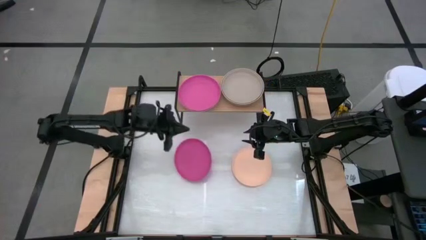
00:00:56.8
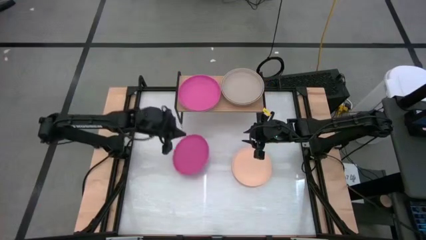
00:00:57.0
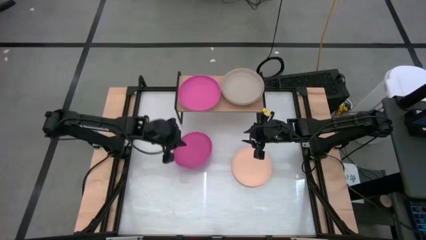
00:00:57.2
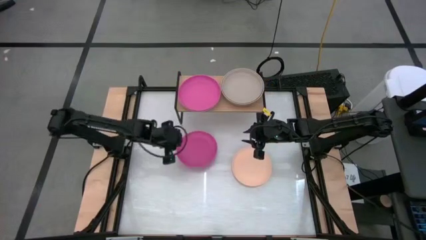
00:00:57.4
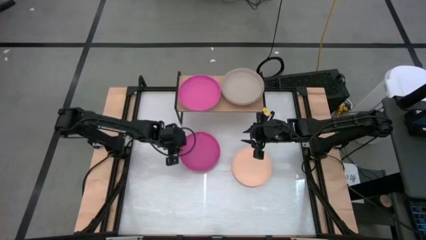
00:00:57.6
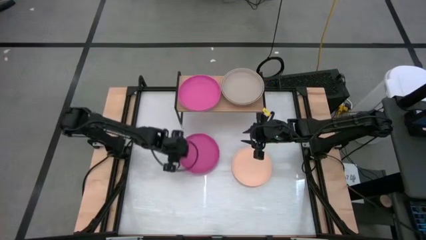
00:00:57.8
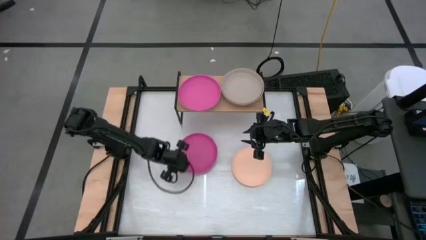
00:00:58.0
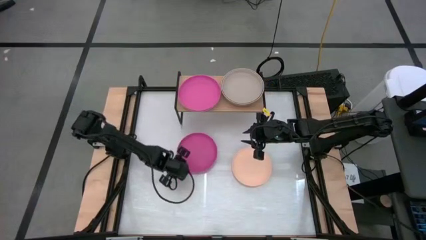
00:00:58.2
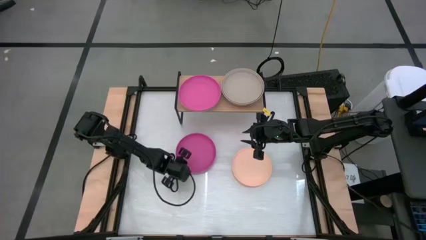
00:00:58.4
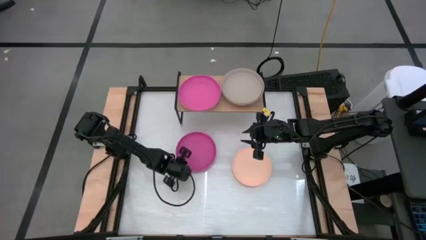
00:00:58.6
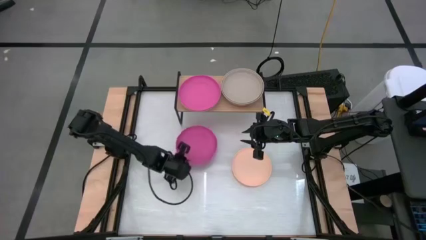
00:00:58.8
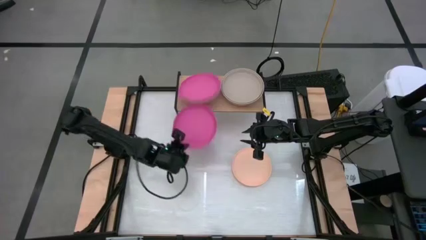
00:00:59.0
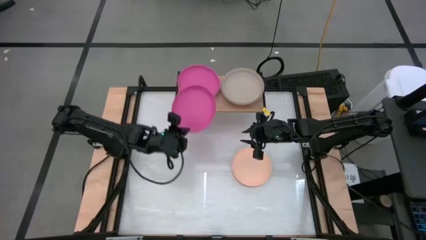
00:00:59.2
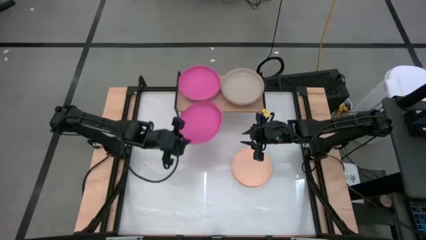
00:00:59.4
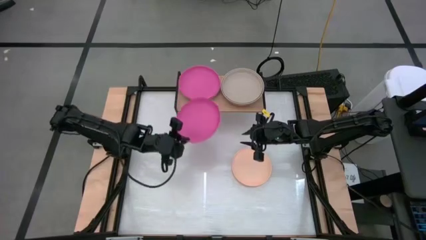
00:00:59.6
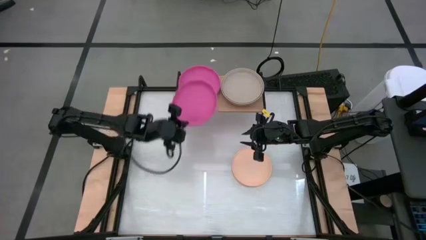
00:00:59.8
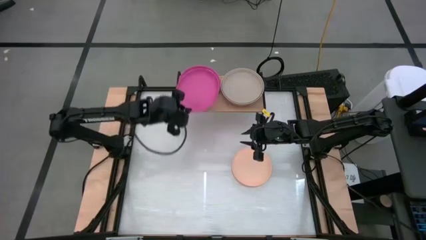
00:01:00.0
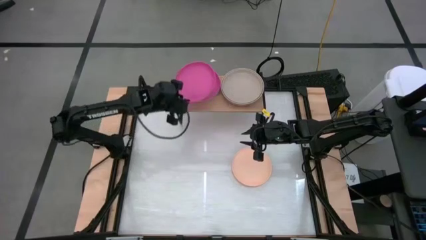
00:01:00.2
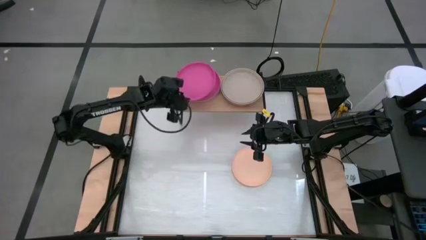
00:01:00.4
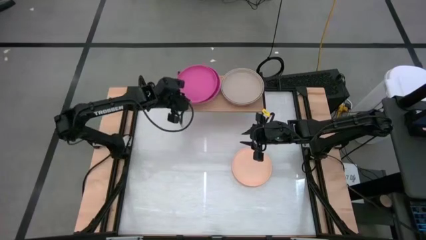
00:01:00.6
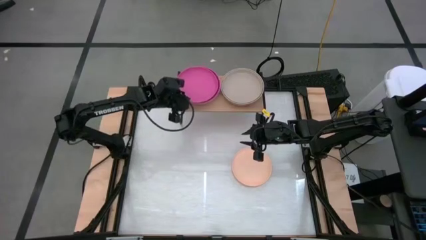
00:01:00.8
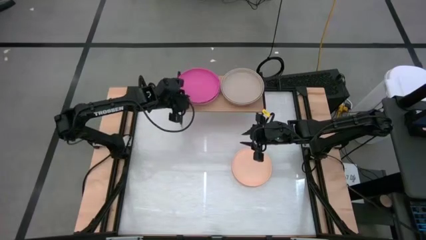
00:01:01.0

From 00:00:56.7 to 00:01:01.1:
Task: Place and stack plates onto a shelf
Stack the pink plate on top of the pink plate on the shelf

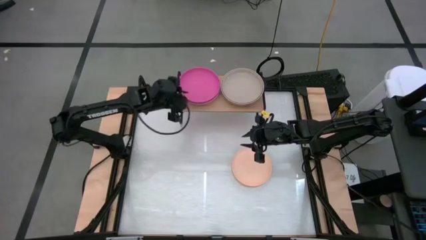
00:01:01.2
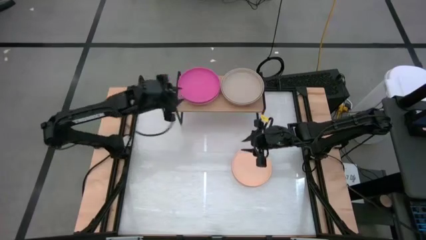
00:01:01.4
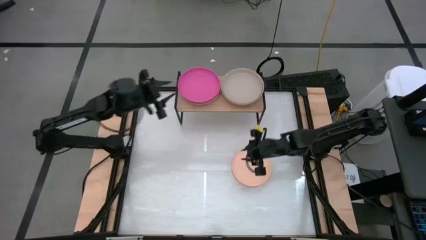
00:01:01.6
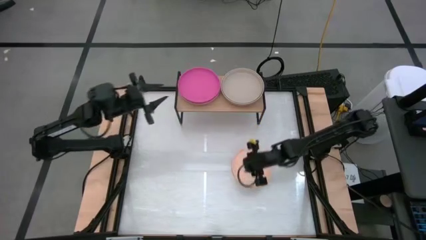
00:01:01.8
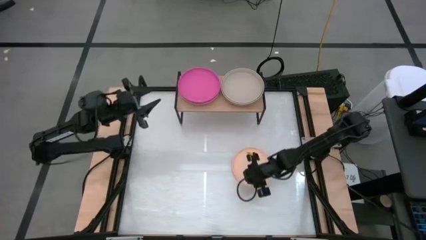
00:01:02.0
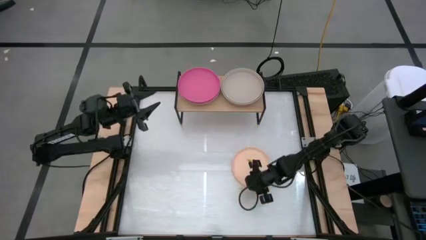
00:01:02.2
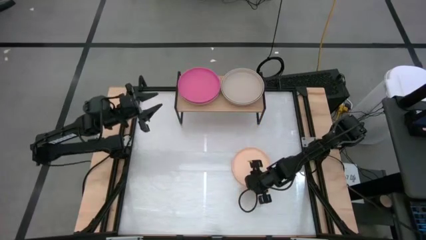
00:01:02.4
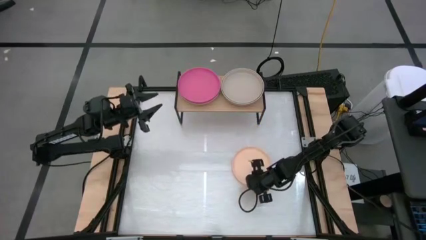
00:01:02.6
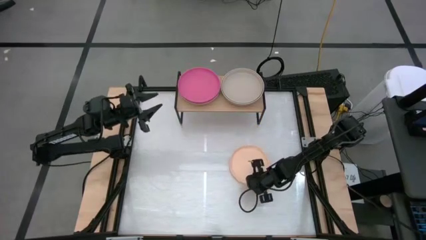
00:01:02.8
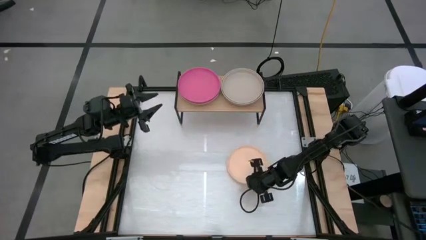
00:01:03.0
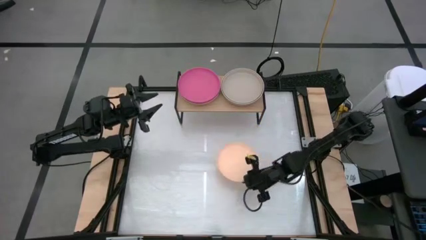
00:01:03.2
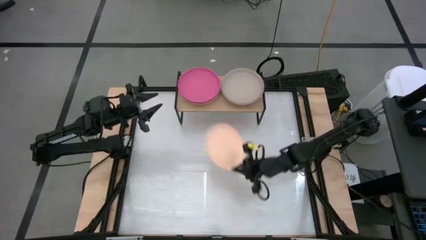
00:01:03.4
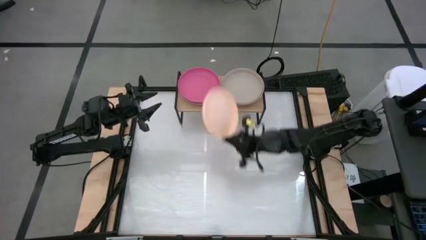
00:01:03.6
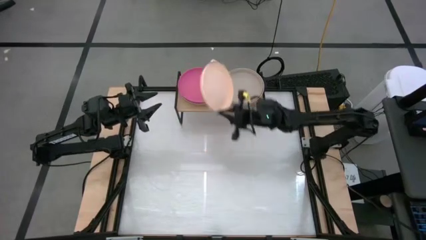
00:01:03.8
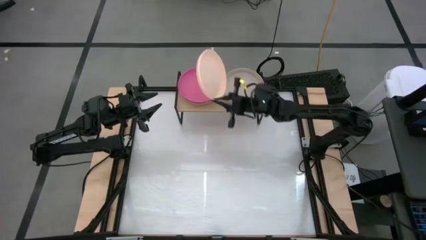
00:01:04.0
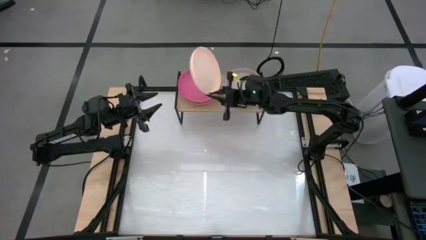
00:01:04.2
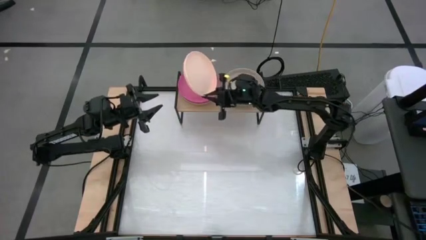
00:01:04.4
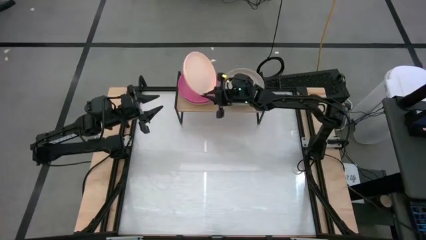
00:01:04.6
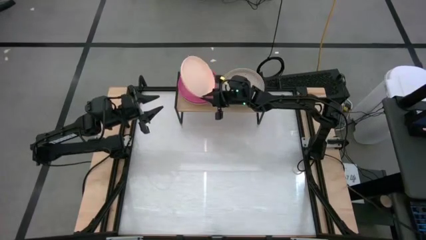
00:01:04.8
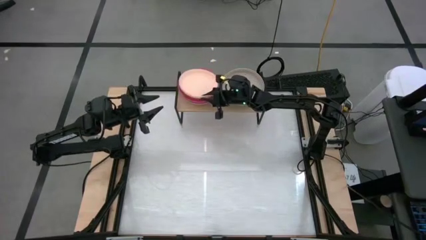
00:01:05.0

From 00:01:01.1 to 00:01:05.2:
Stack the light orange plate on top of the pink plate on the shelf

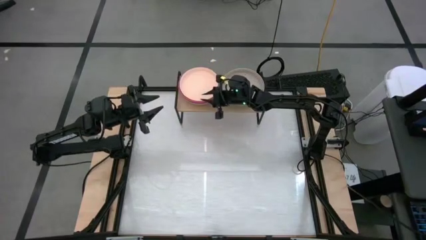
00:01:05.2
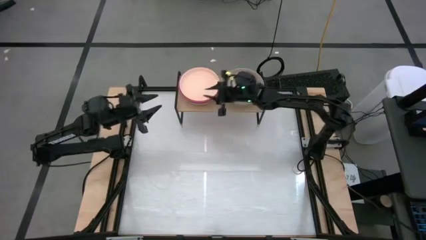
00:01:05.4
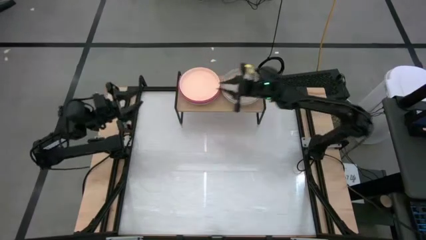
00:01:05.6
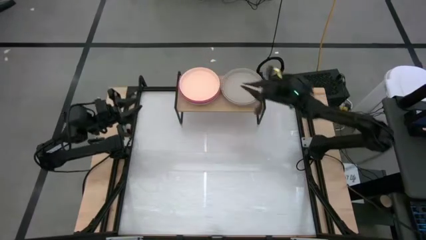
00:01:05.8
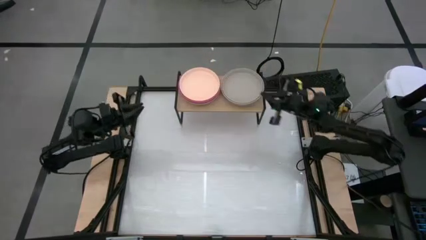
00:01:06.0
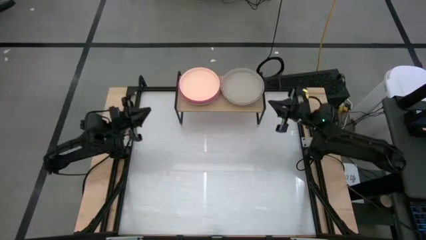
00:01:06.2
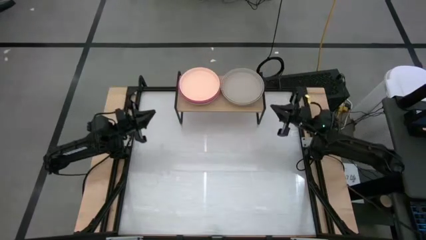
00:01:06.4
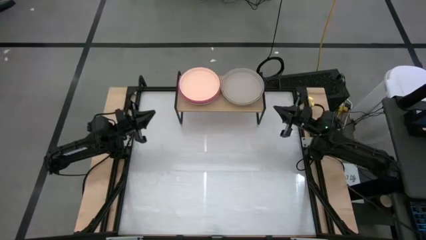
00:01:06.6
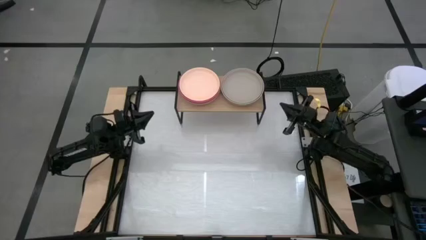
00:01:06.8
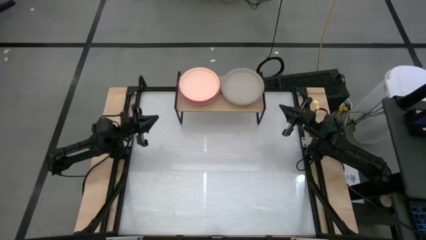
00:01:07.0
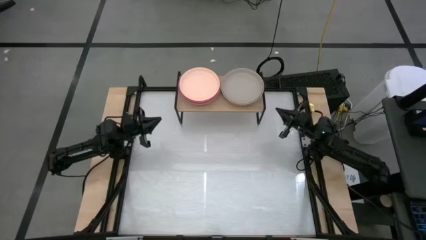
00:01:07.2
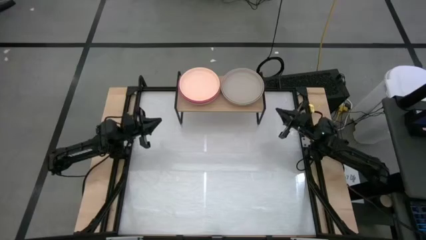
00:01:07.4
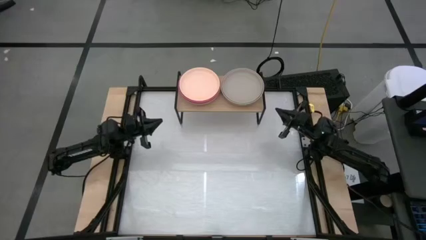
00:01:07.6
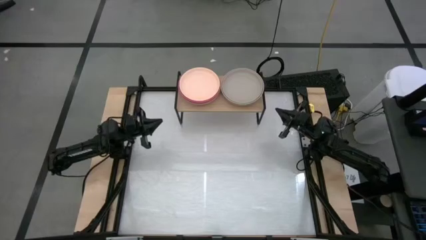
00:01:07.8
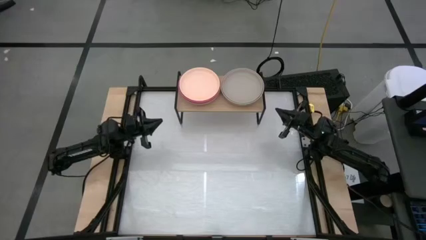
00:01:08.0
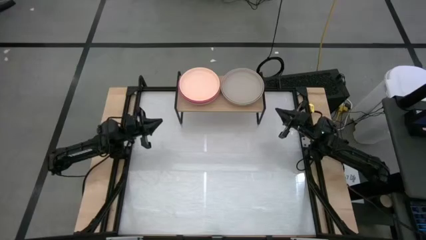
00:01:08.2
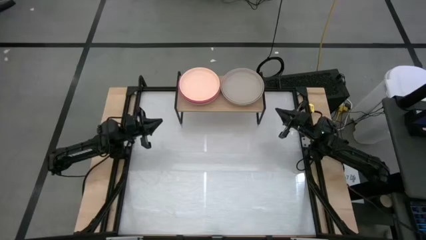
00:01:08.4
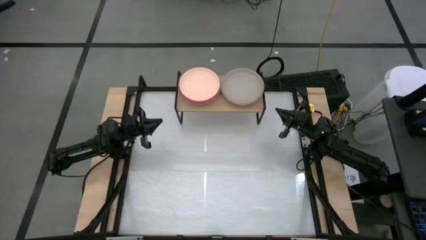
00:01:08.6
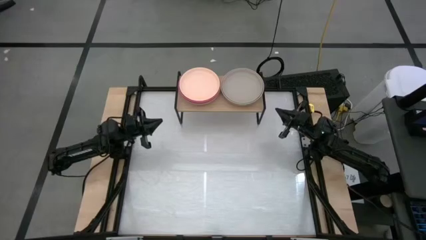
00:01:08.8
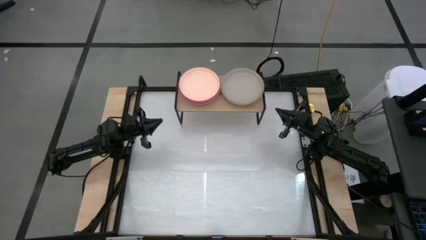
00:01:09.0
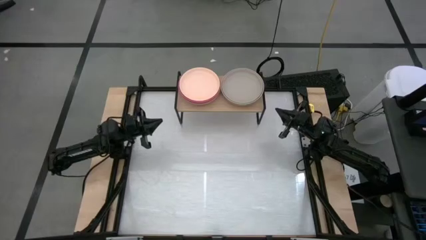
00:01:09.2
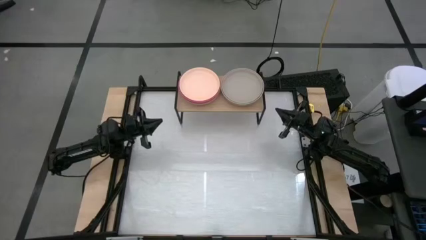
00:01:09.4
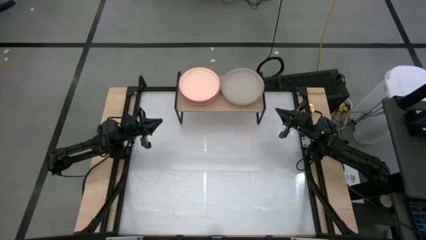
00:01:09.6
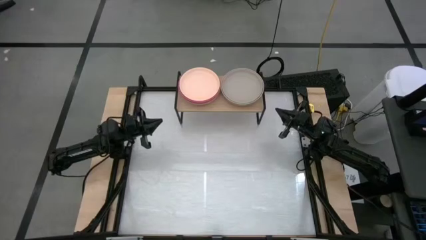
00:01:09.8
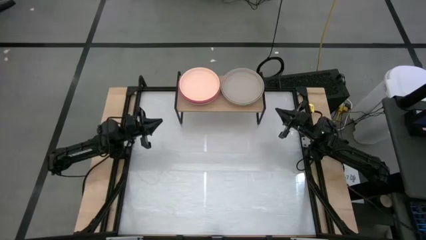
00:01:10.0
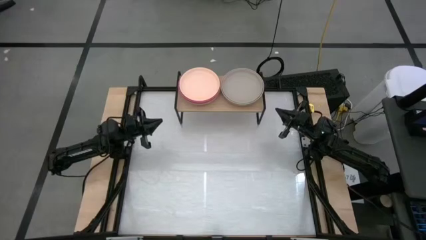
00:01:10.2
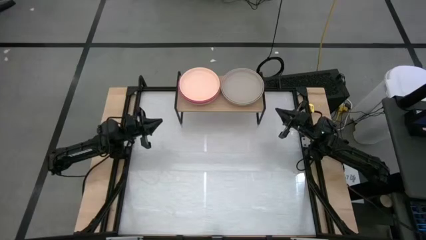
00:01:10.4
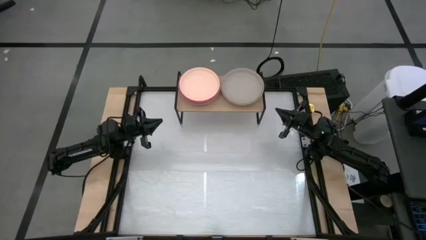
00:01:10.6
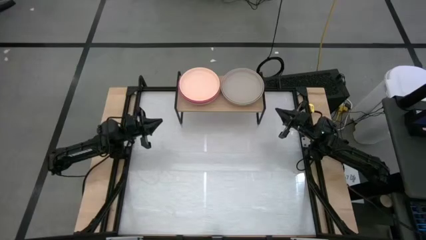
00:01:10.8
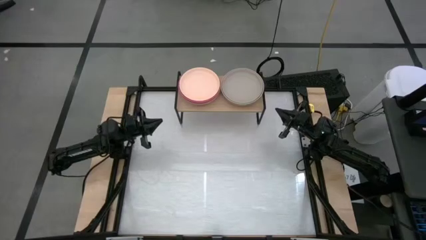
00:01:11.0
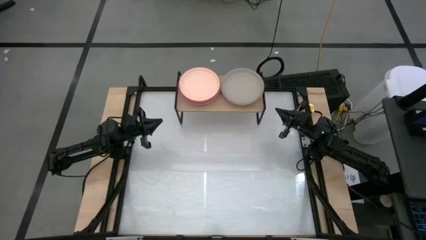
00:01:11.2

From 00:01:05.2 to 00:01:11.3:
Return to Home Position

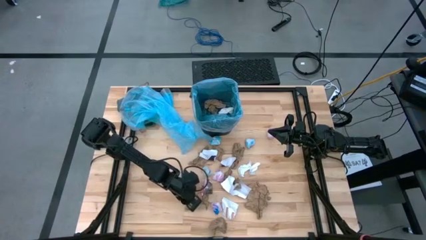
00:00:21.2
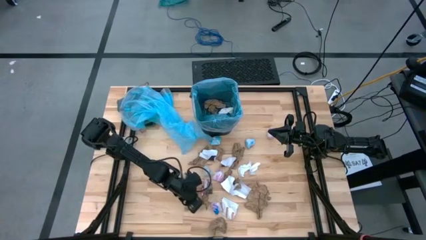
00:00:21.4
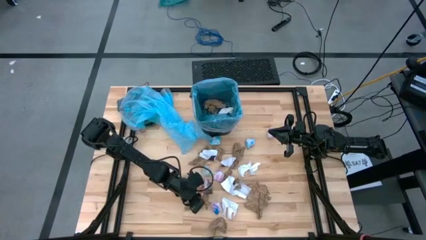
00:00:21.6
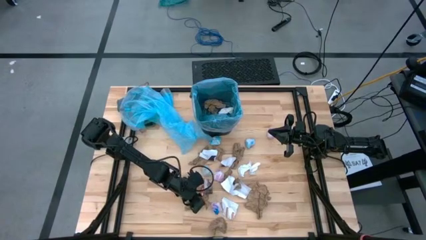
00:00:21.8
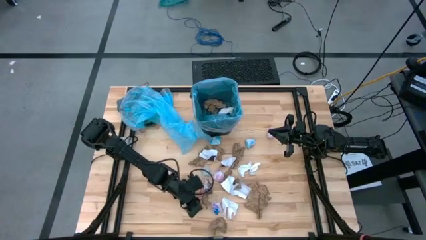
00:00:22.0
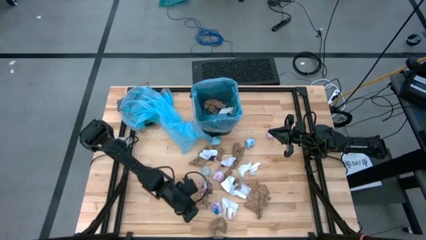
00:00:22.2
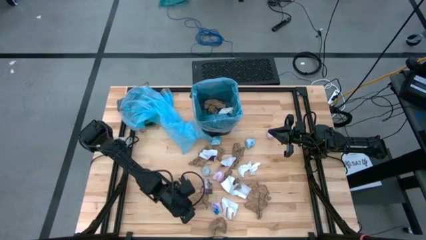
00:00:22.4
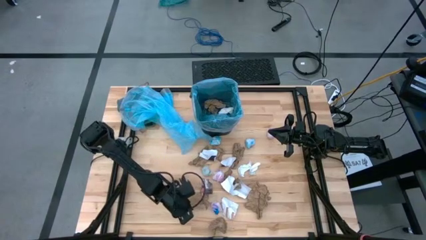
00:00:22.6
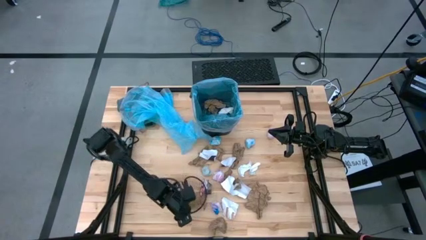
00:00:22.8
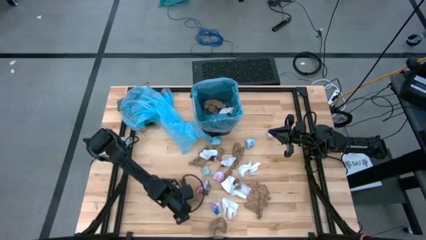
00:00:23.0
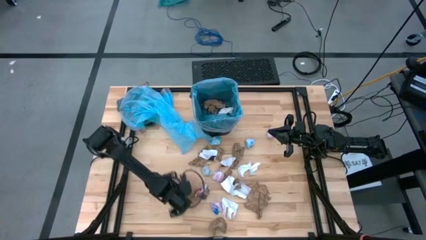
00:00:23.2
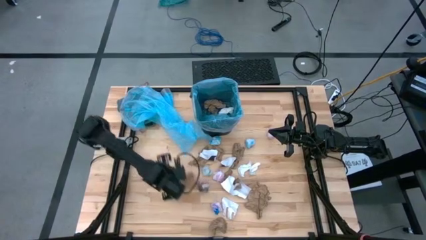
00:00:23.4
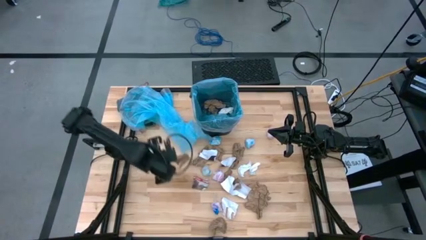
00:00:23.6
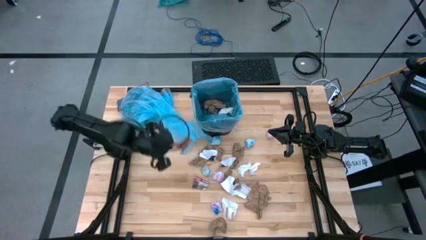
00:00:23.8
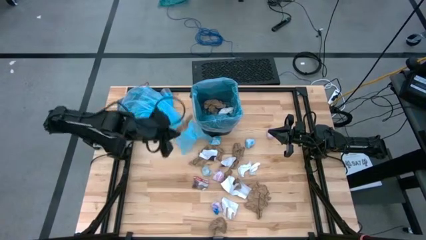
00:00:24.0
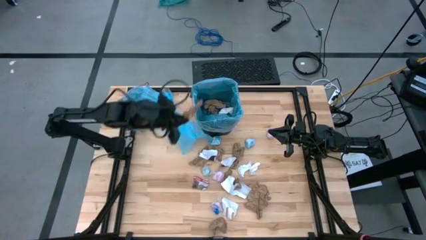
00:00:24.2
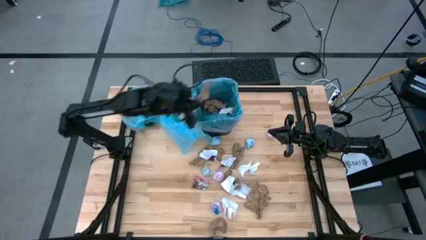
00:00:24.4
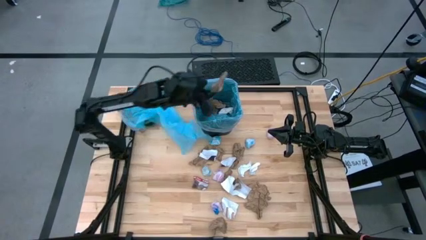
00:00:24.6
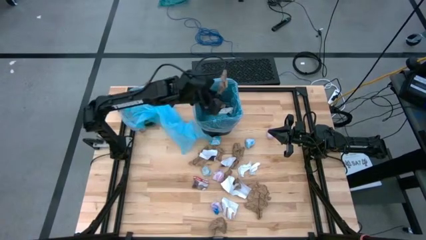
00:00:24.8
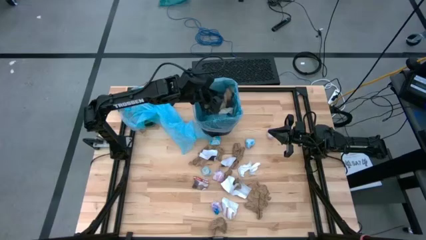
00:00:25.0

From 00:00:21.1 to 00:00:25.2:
Task: place trash/remove bag and relplace
Put the brown paper into the trash bin
